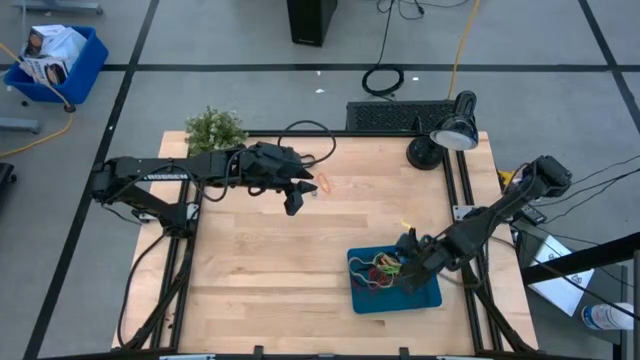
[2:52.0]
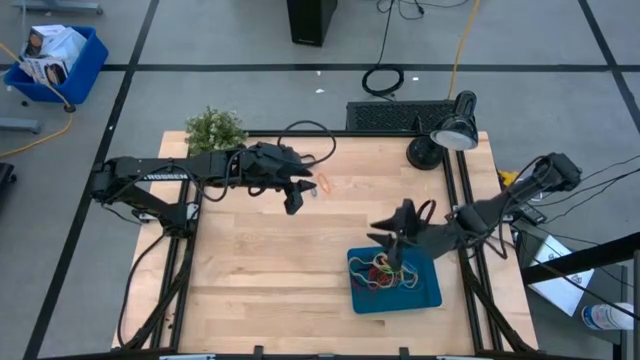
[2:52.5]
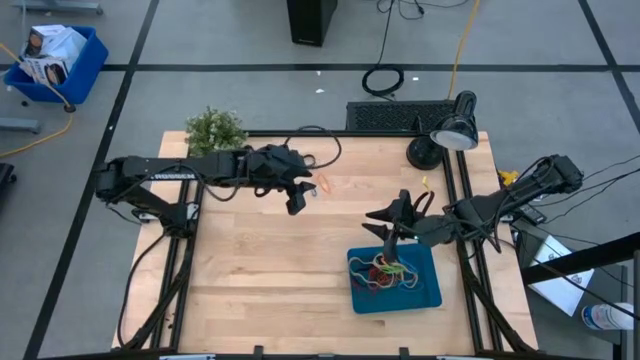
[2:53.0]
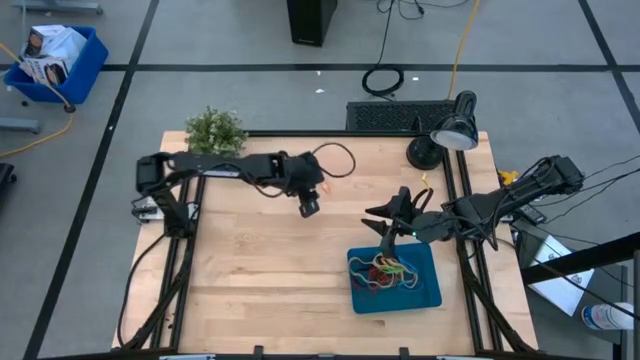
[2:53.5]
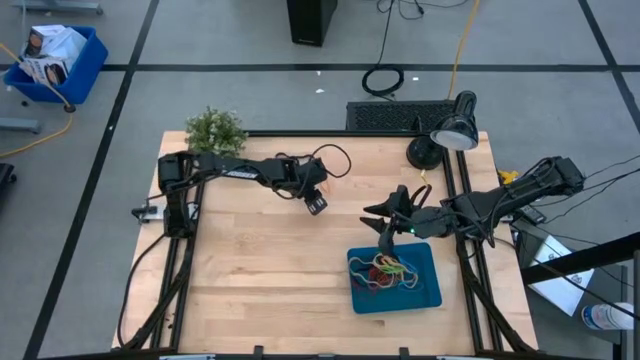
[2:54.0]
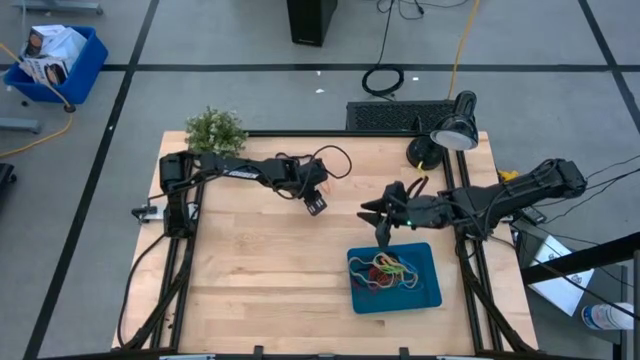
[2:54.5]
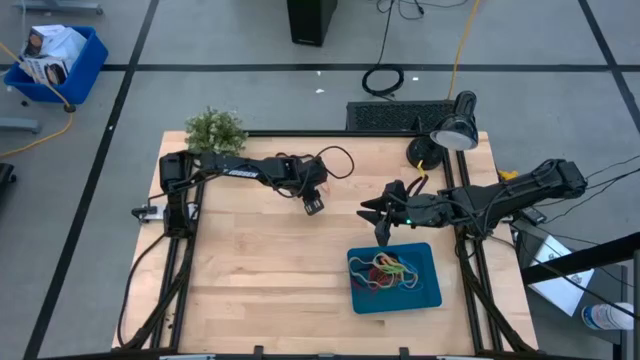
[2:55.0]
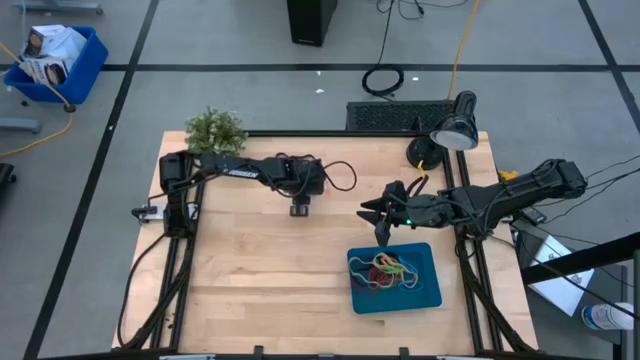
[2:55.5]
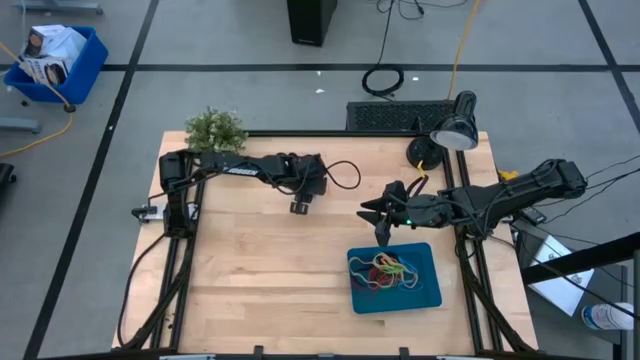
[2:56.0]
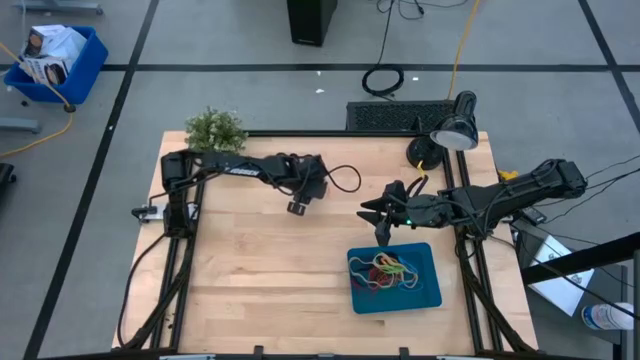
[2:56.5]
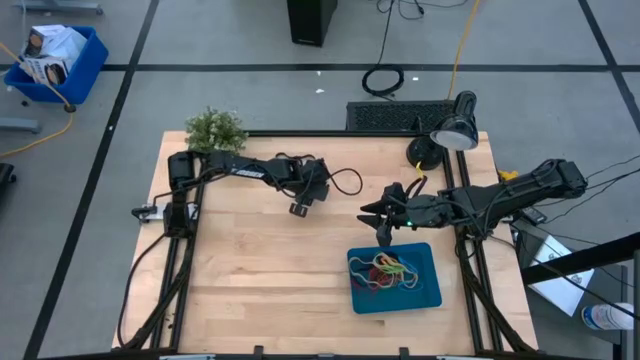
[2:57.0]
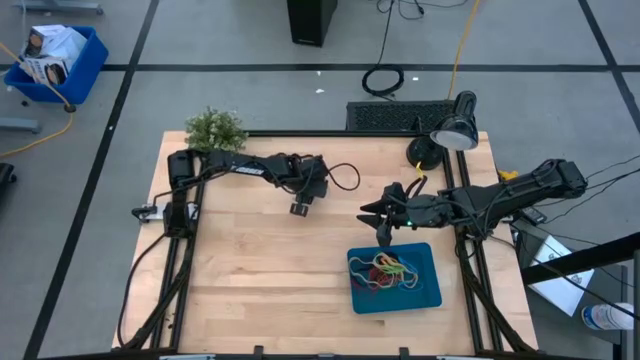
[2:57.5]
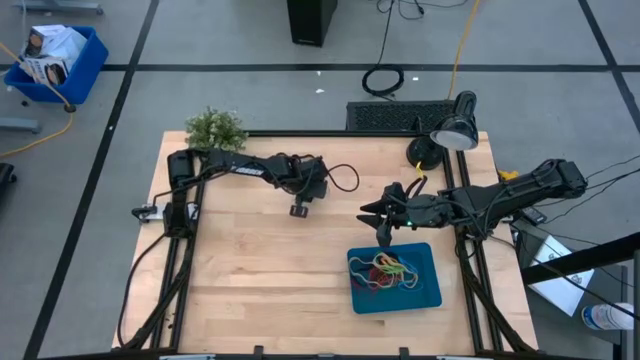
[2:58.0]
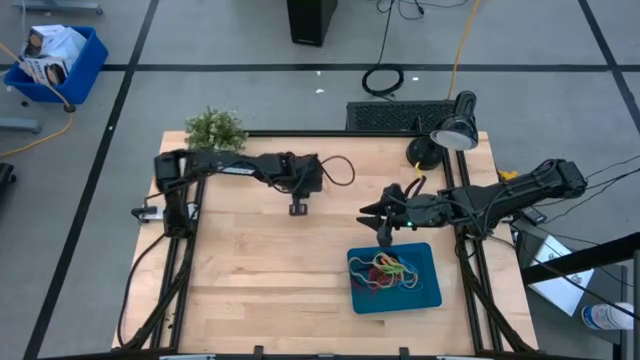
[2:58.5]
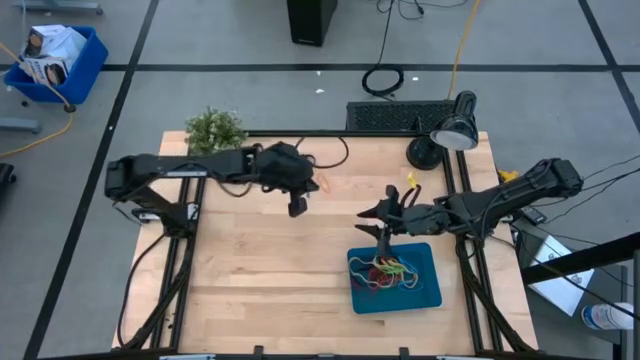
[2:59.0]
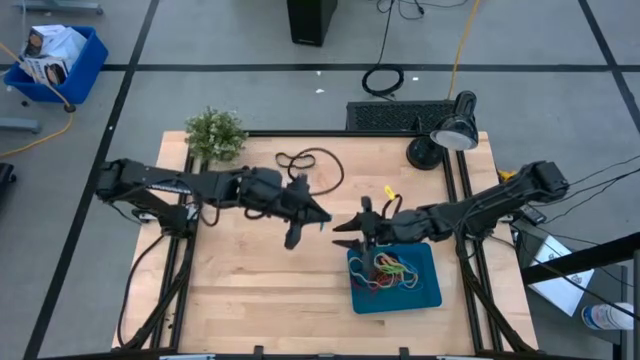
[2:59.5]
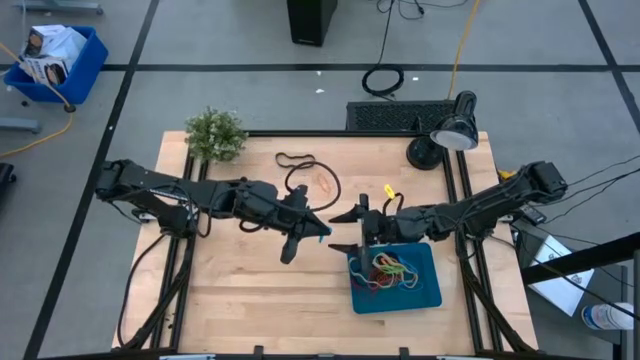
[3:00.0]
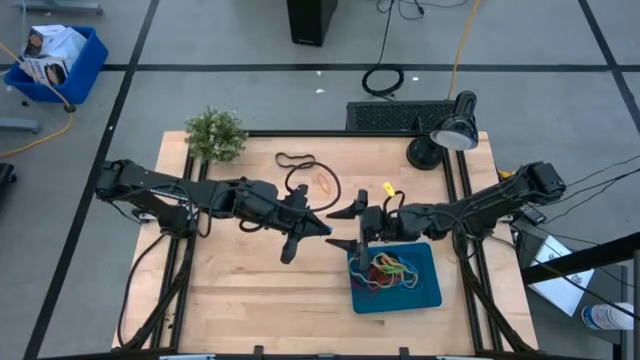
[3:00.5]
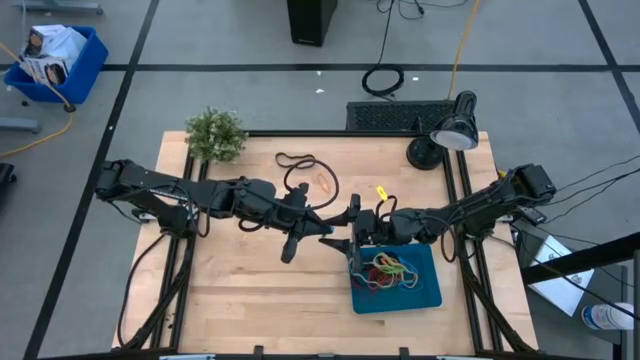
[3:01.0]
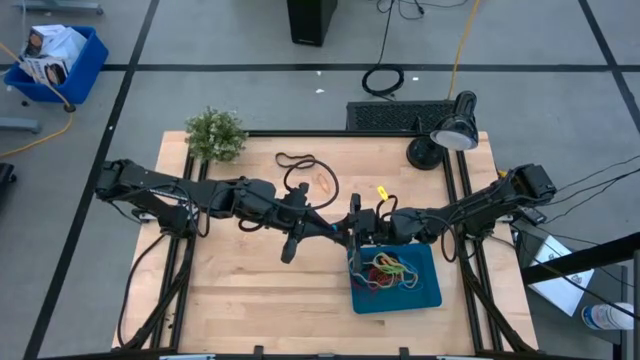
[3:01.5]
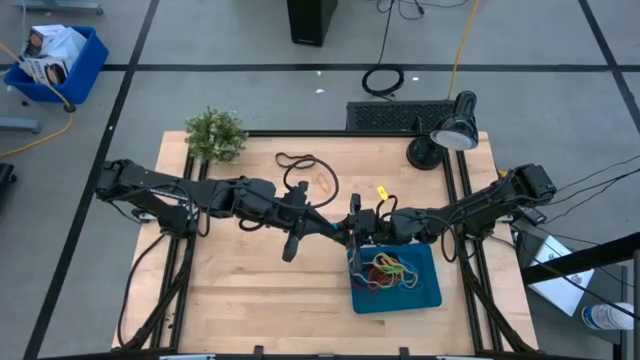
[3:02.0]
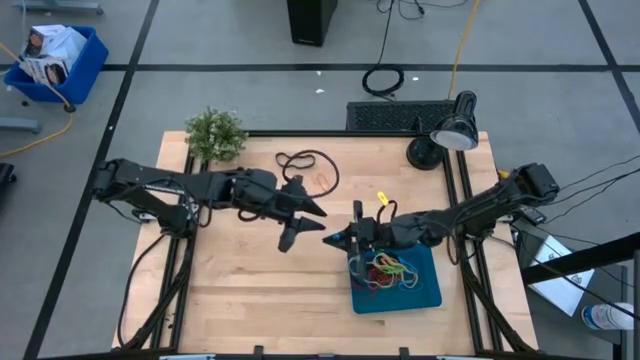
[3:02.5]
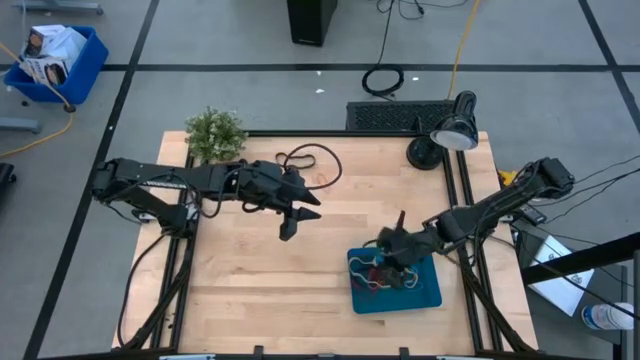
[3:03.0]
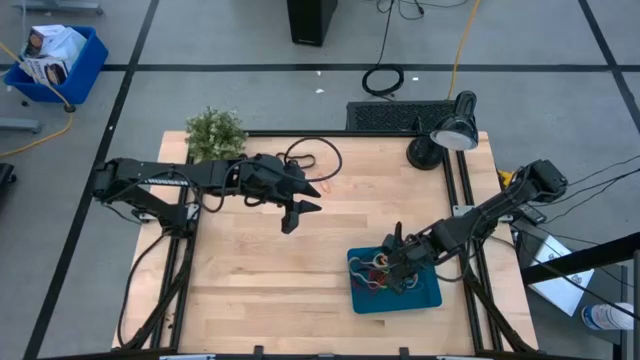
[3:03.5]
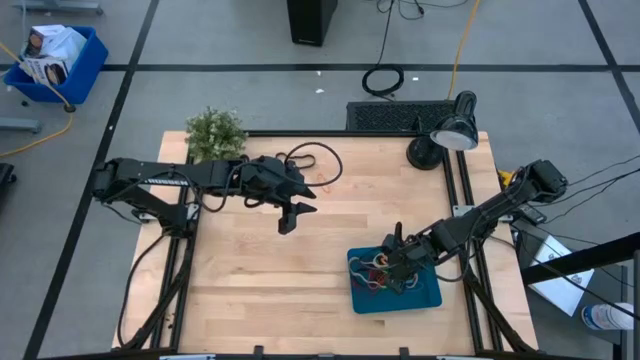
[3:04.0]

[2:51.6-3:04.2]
Task: Pick and place rubber bands into bin
Put the blue rubber band into the blue bin

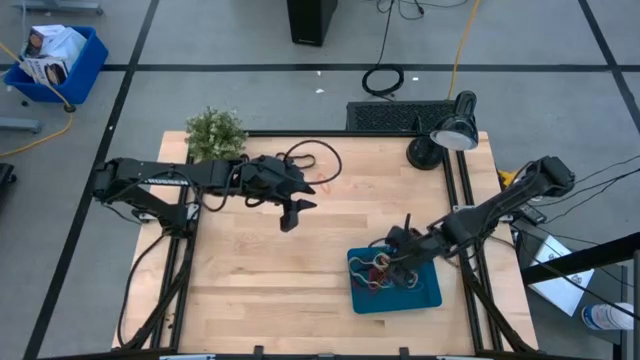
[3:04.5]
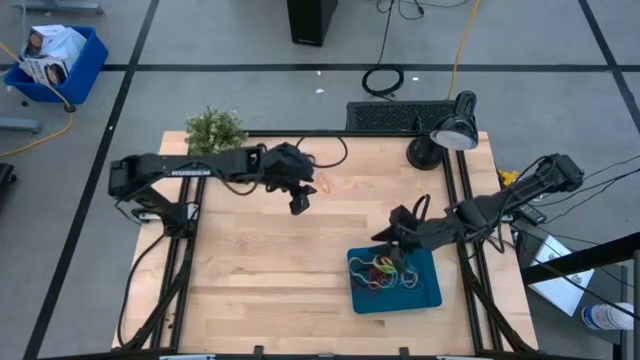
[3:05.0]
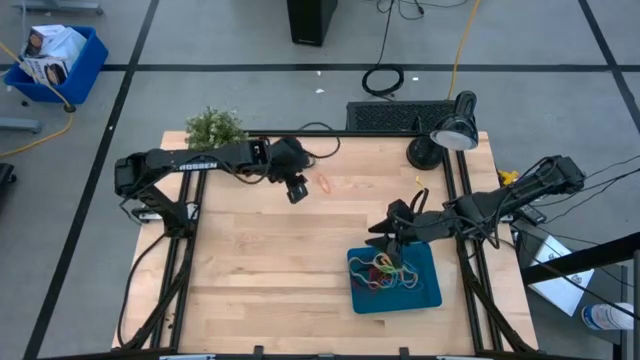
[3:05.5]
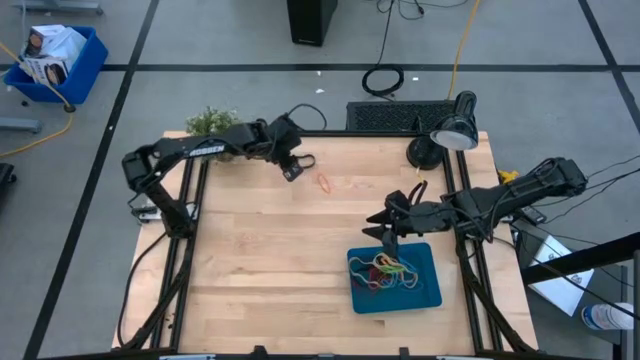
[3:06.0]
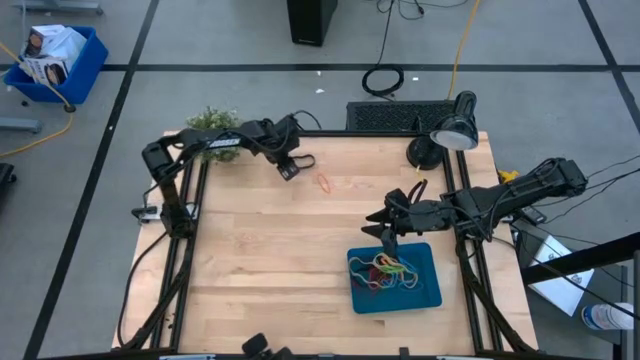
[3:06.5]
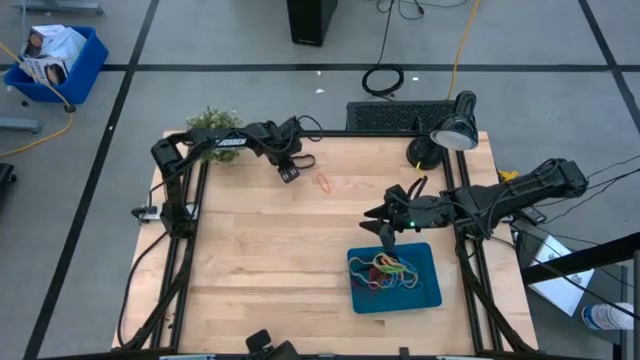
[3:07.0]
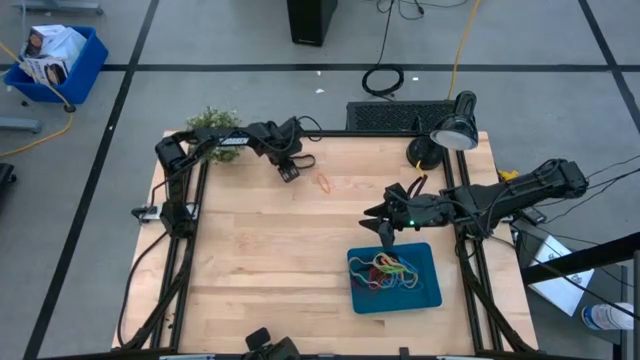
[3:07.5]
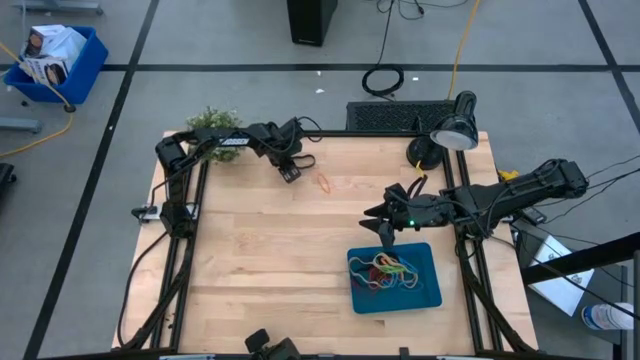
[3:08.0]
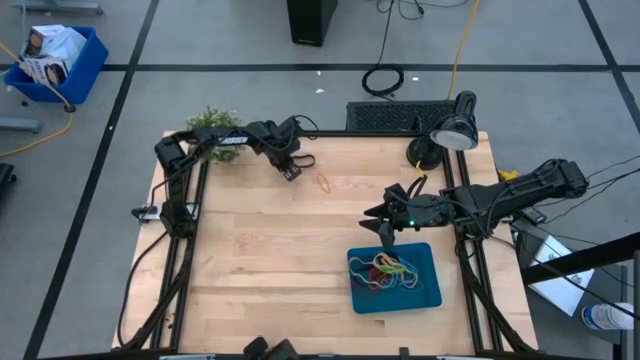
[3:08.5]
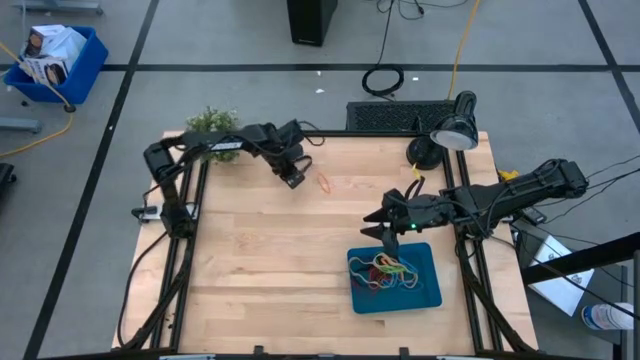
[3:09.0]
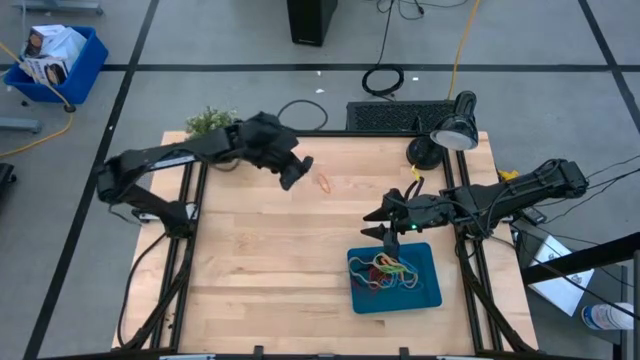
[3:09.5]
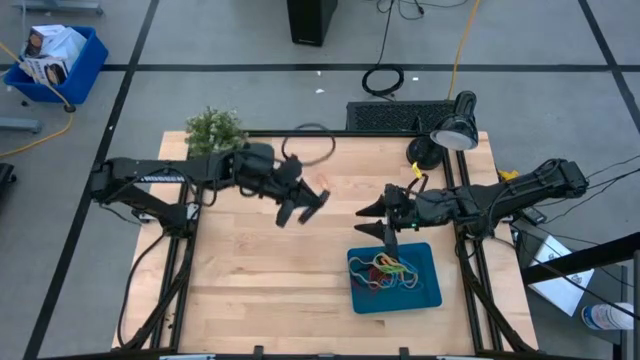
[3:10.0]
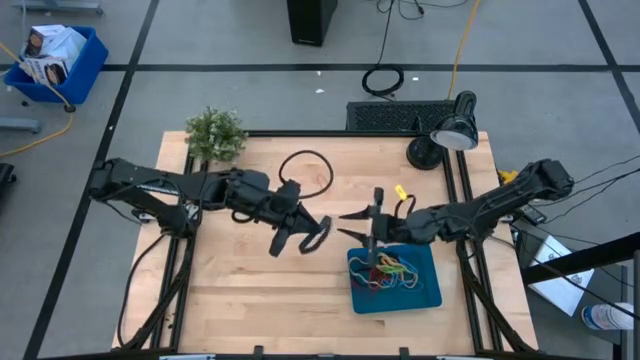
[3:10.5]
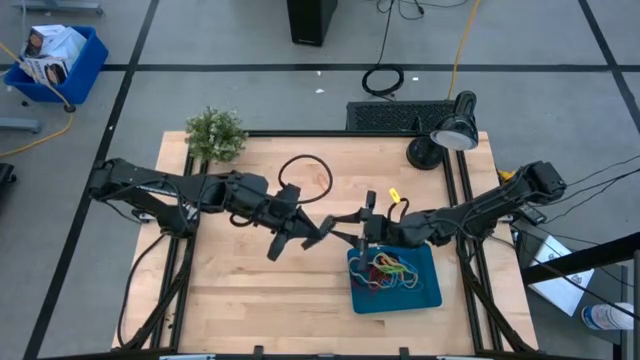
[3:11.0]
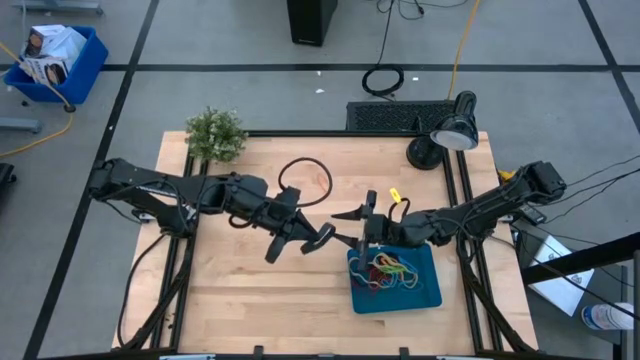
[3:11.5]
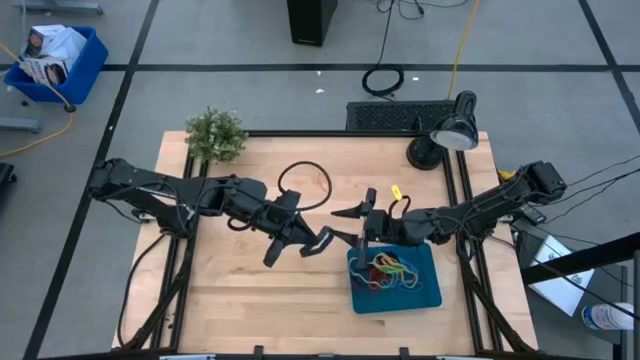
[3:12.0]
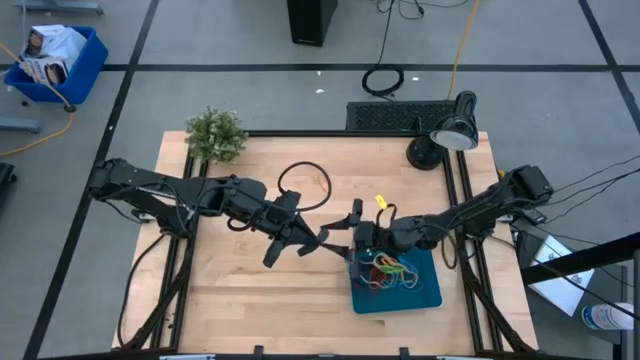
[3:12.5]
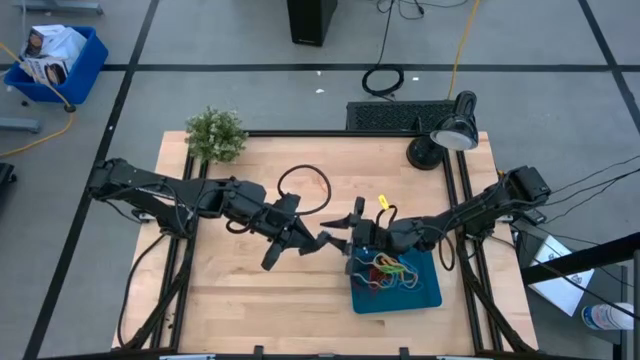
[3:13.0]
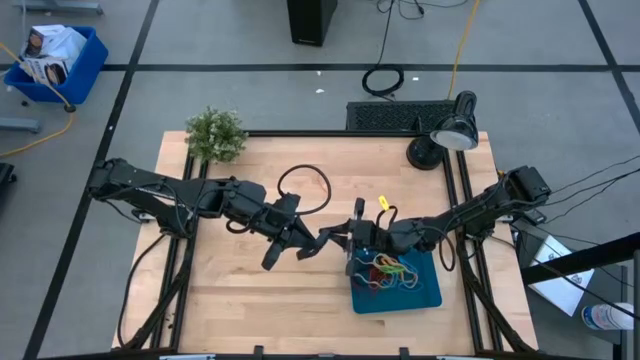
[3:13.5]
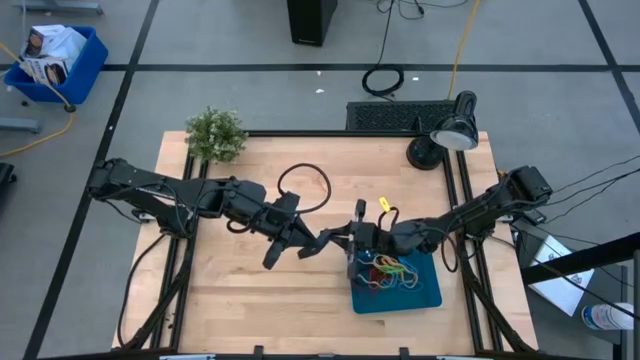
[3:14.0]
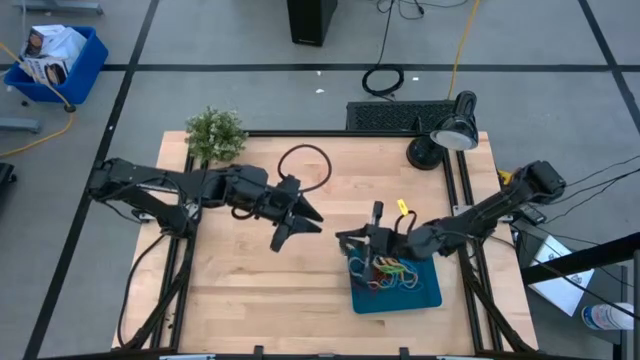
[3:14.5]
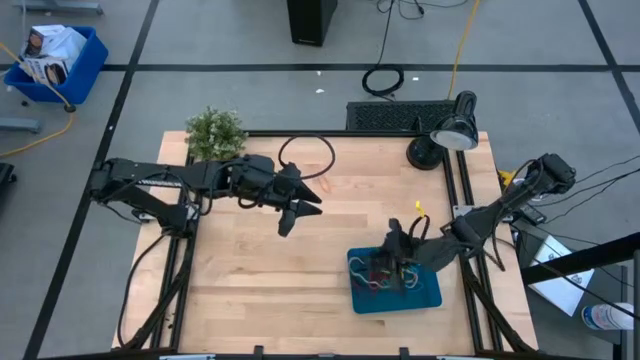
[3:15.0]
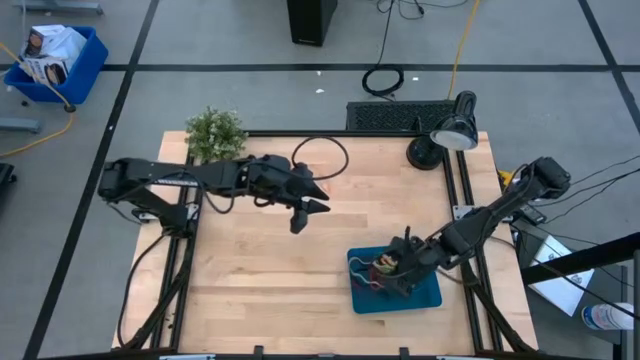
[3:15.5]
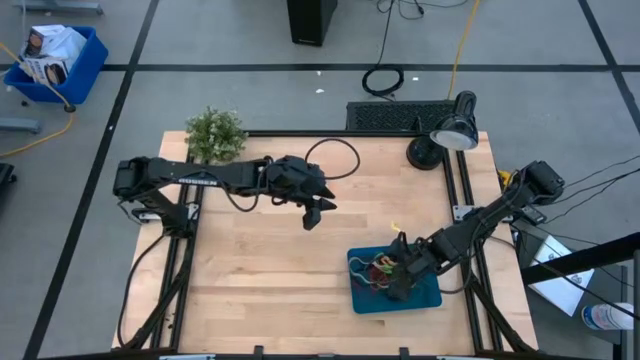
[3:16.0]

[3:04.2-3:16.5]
Put the black rubber band into the blue bin
